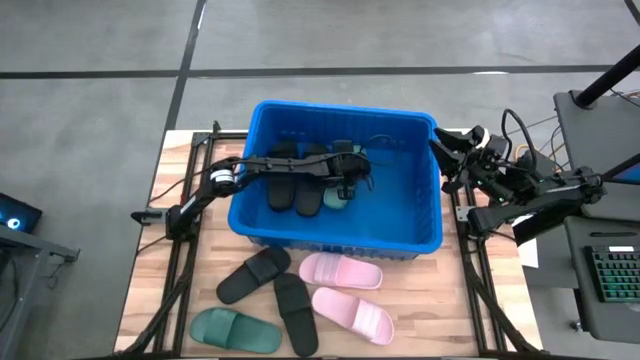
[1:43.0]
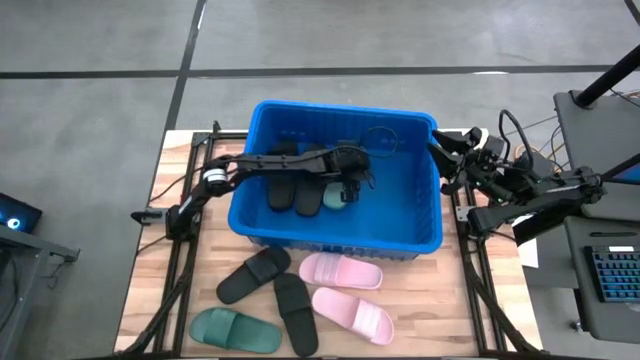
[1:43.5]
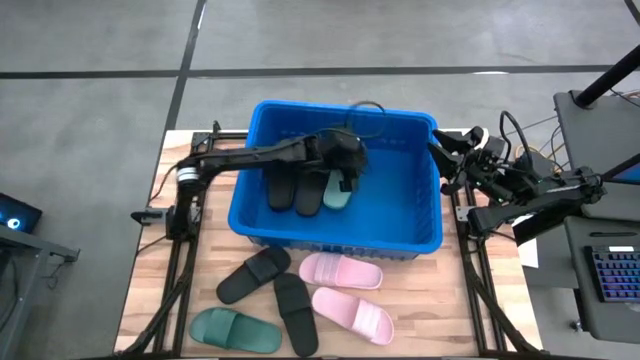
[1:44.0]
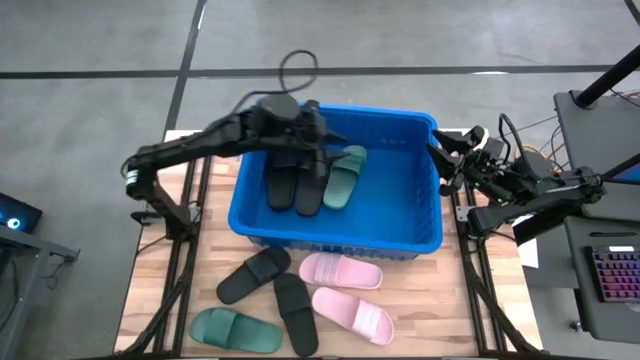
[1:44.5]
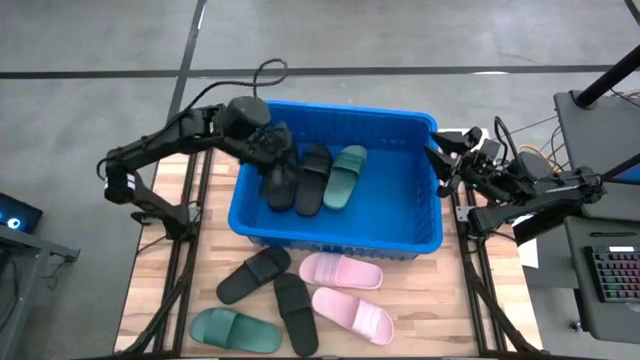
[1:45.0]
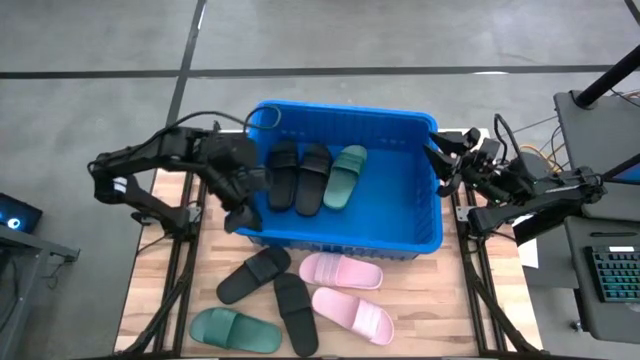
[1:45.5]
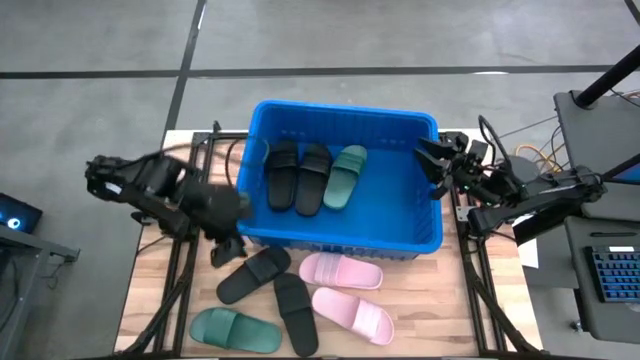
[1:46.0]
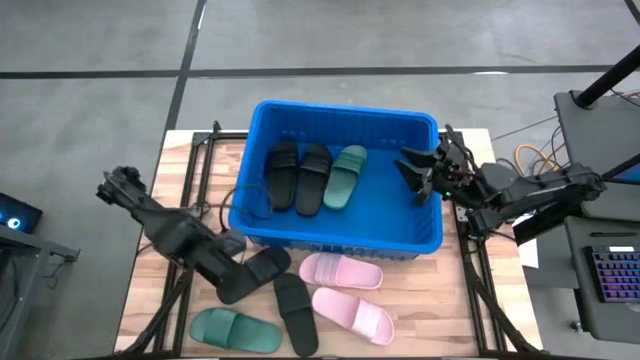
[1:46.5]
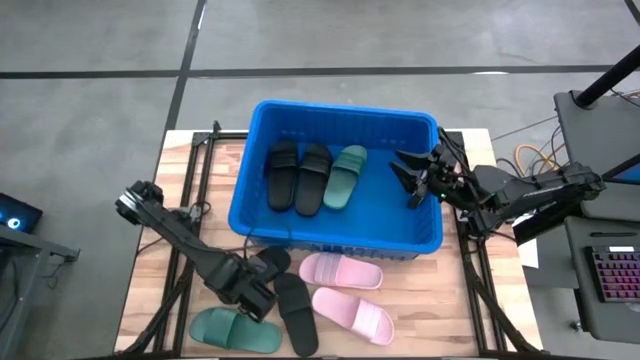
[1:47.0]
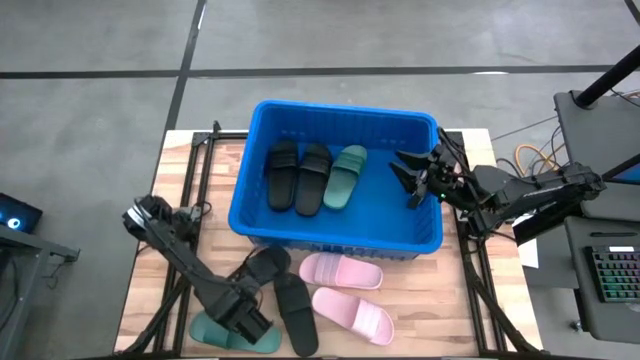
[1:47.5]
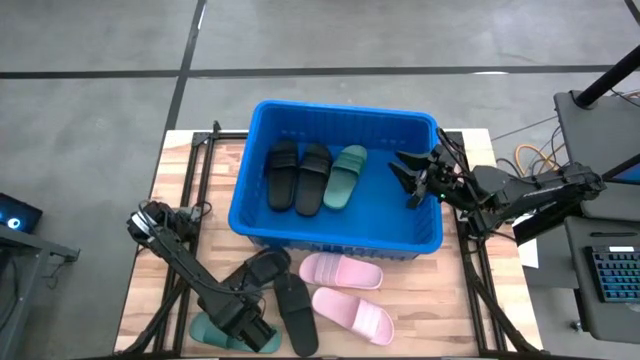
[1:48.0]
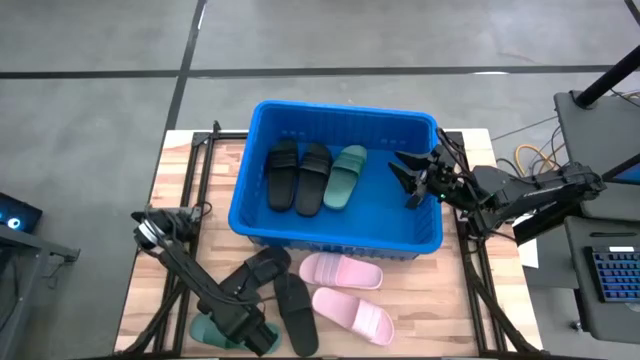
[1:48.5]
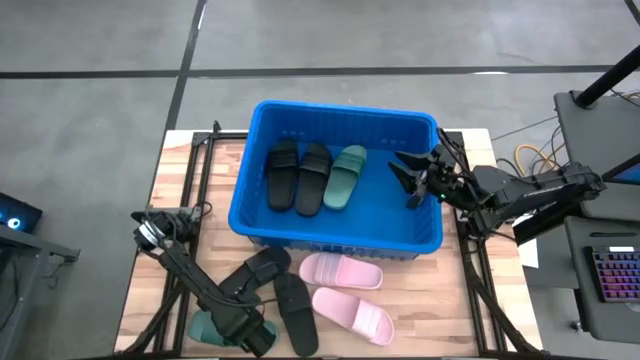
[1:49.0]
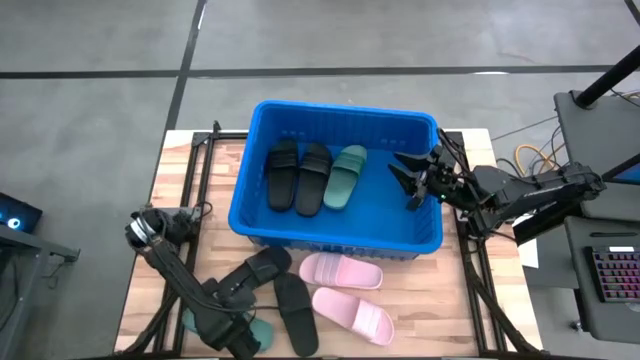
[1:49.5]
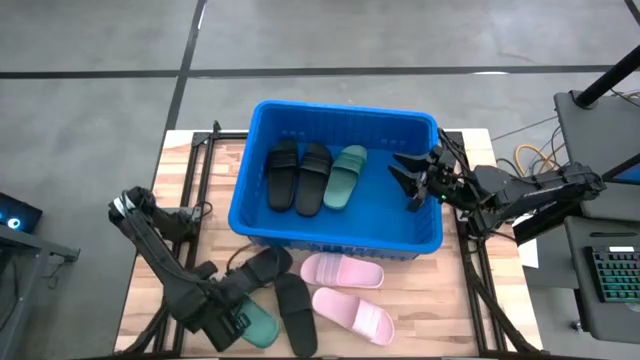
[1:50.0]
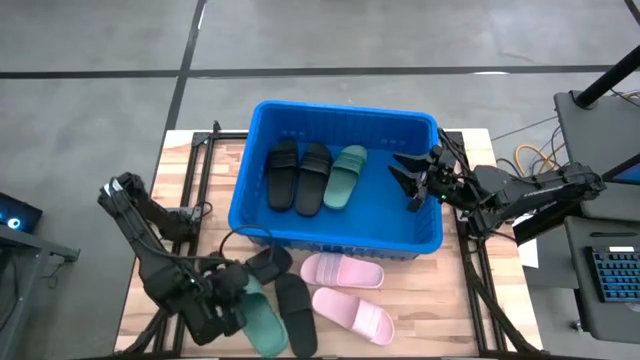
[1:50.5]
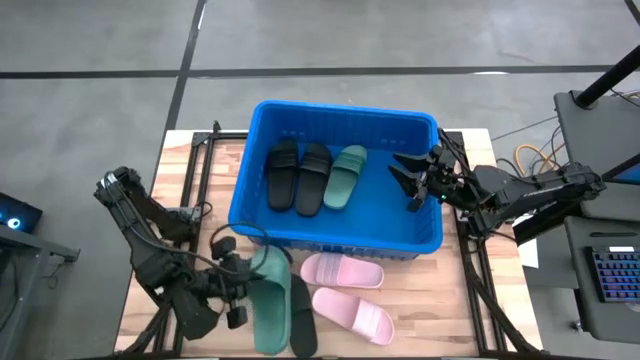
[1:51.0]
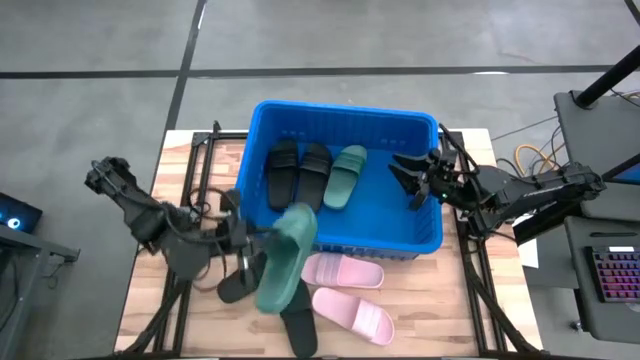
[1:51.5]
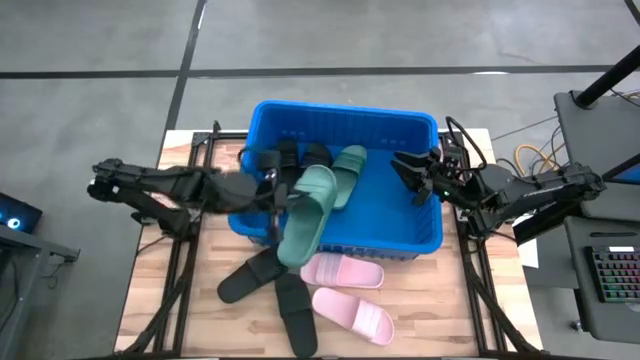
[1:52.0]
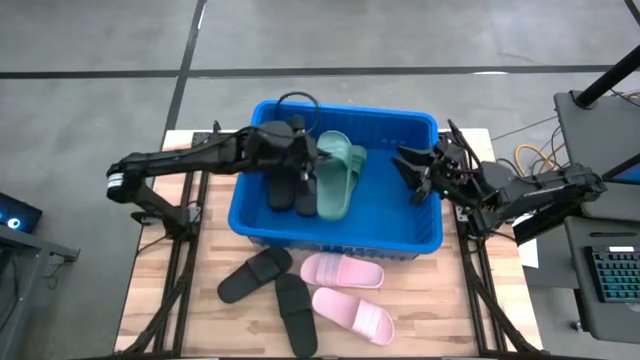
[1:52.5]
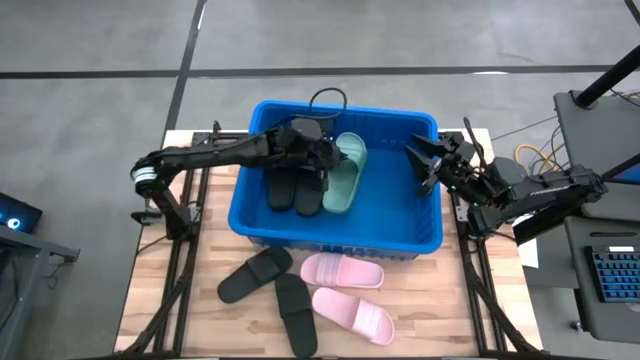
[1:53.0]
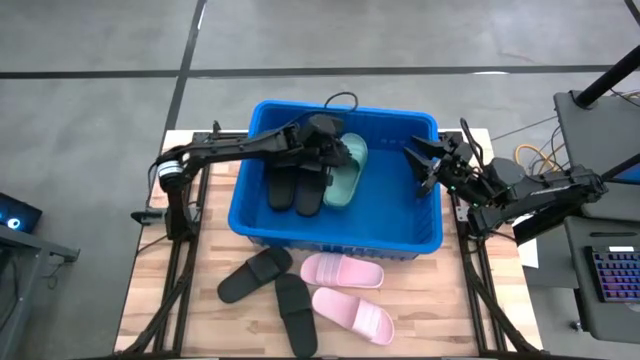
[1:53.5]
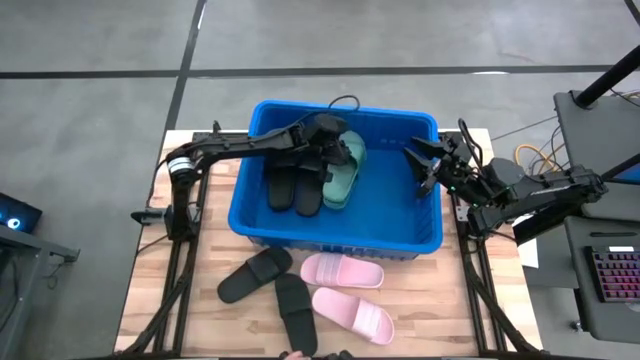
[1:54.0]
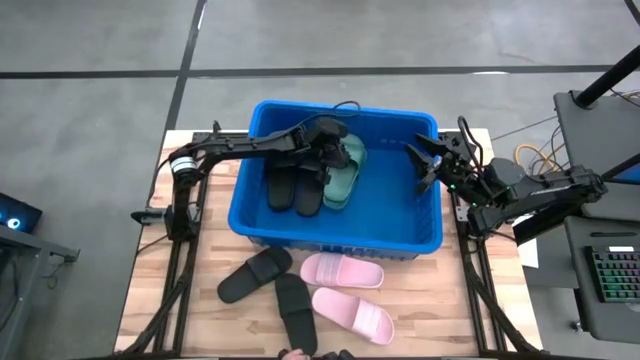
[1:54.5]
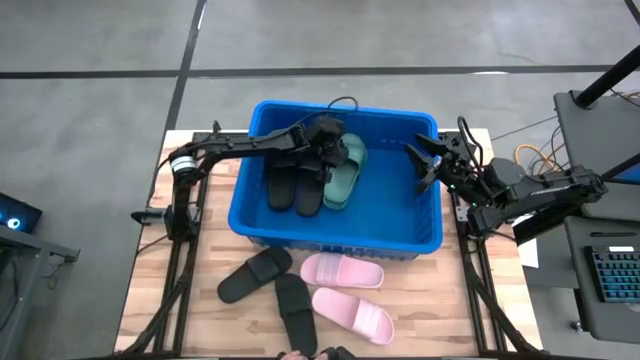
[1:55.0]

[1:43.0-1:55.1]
Task: Pick and place slides into bin
Stack the green slide on top of the green slide into the blue bin

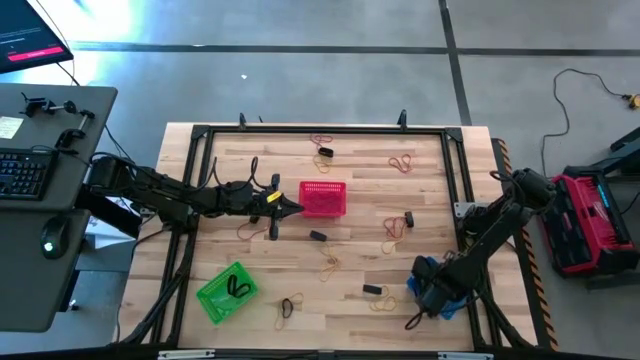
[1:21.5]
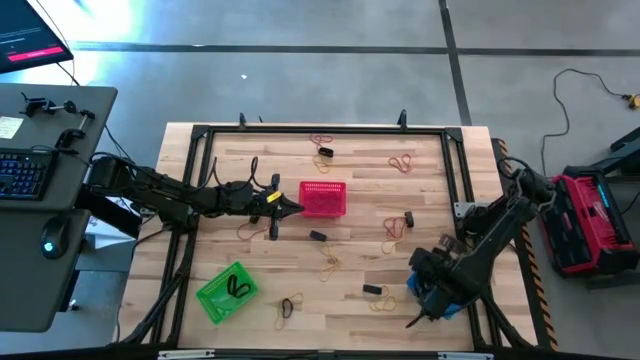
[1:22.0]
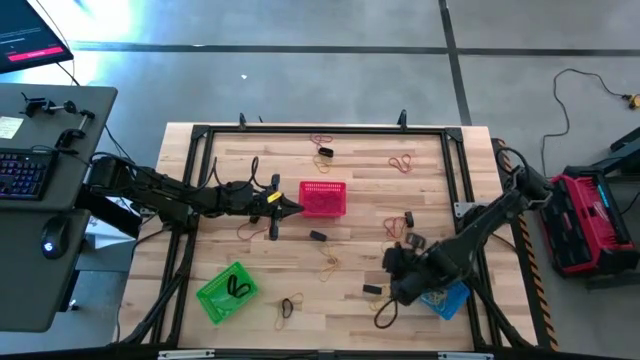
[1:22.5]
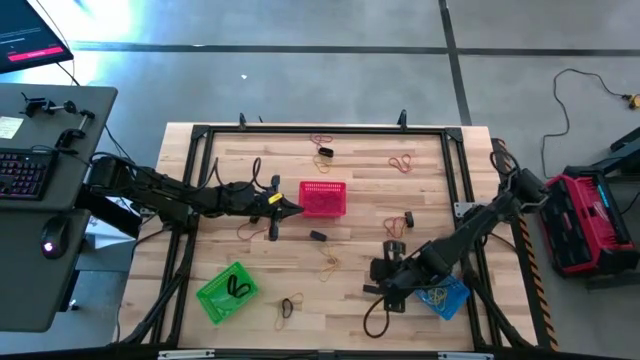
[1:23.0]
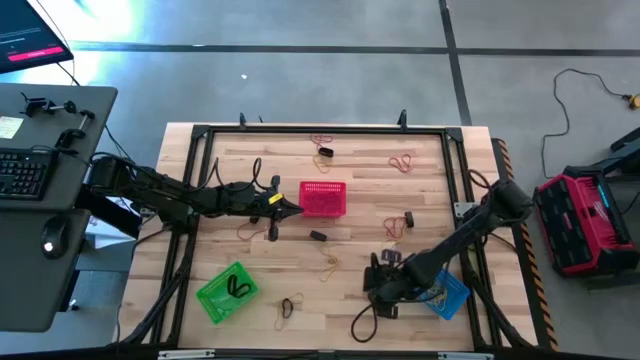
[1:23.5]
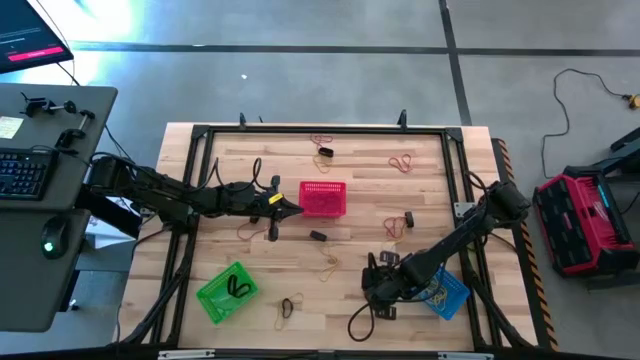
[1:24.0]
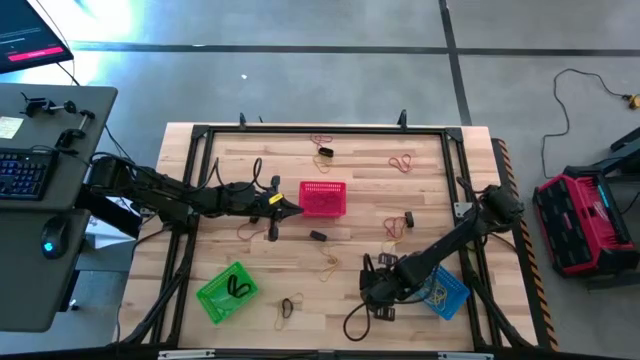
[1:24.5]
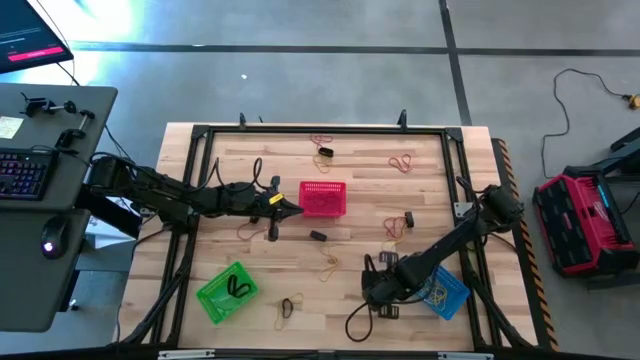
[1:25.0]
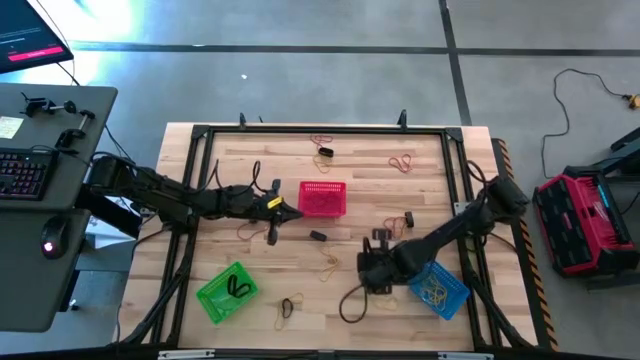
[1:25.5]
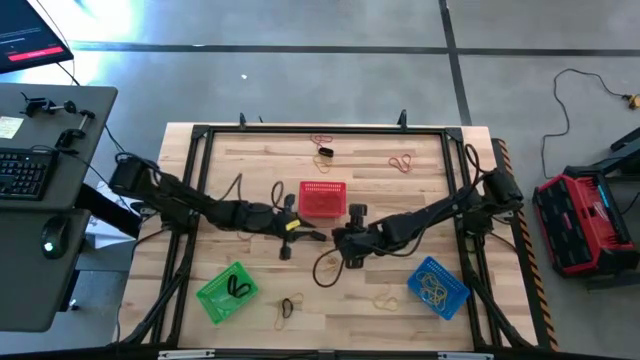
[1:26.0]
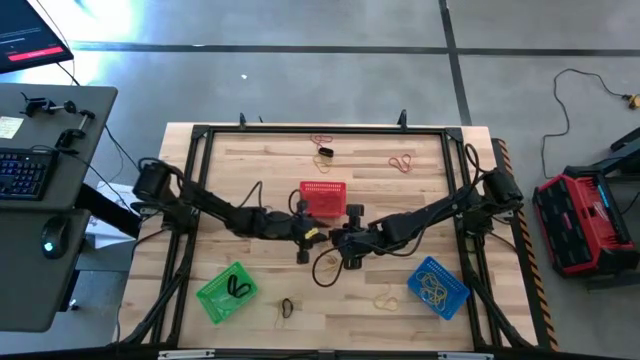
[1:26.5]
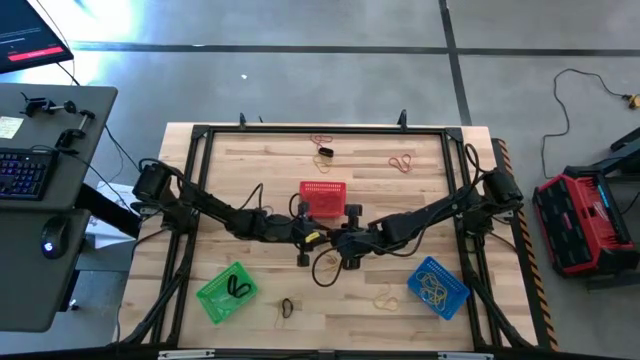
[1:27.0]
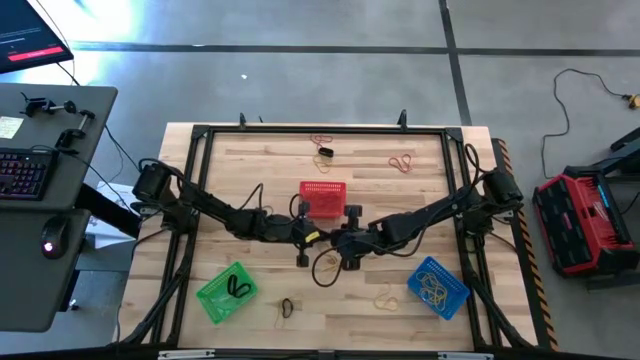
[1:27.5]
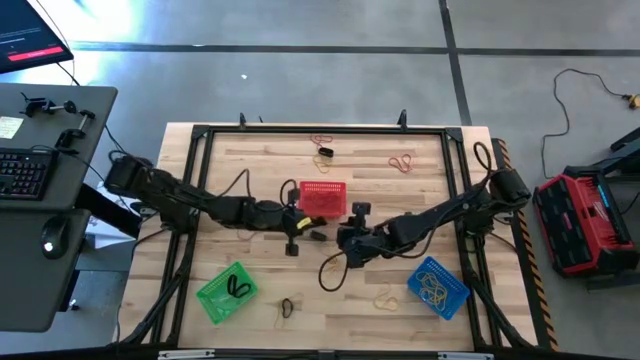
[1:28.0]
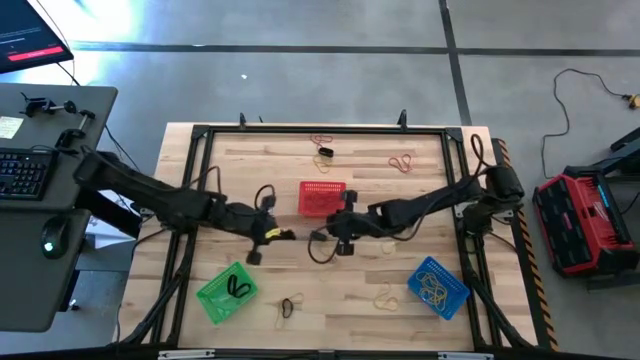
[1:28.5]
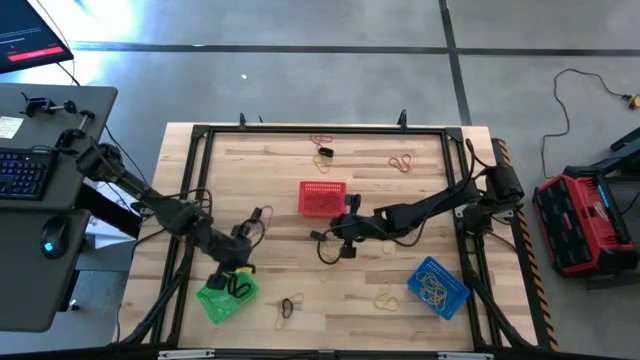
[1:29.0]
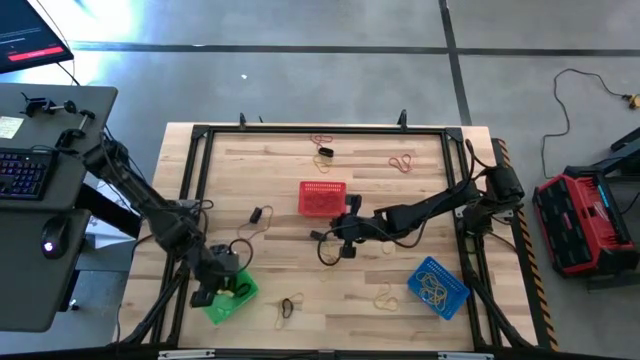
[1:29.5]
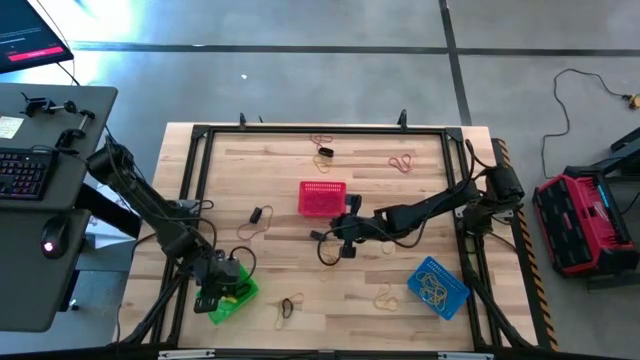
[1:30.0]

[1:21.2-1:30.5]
Task: Sort rubber bands into baskets
Put the black rubber band into the green bin
